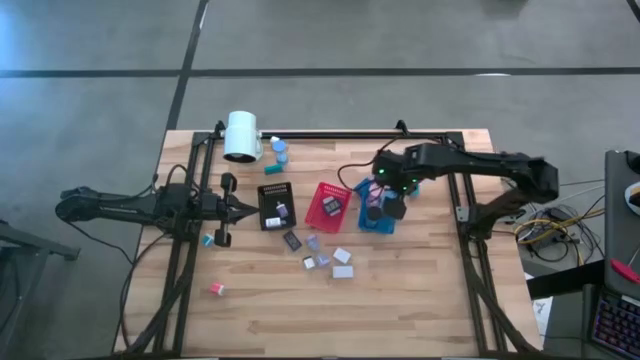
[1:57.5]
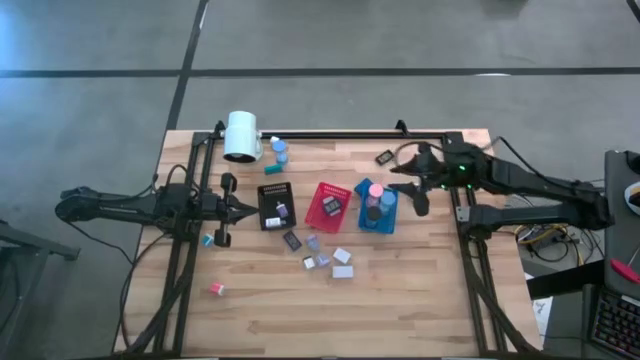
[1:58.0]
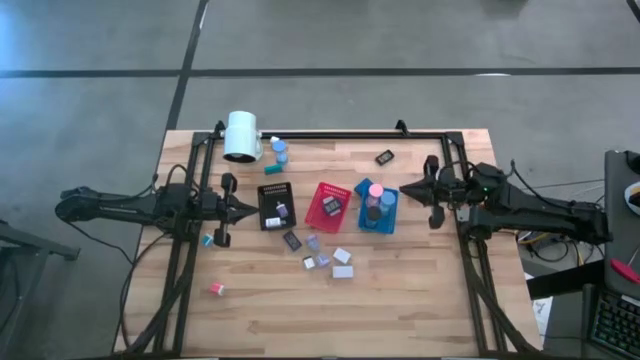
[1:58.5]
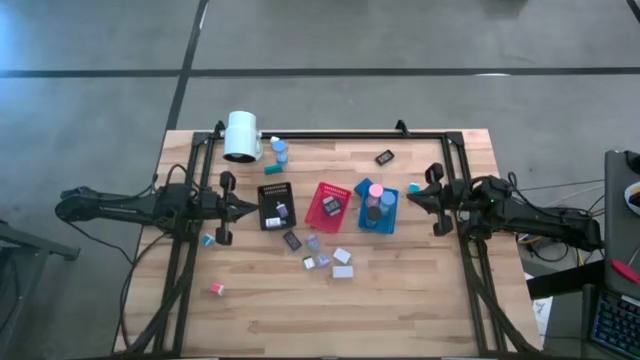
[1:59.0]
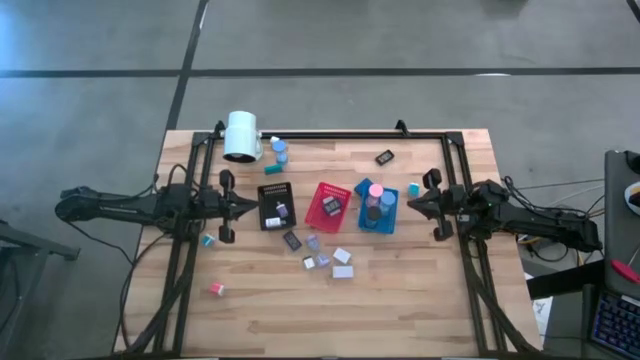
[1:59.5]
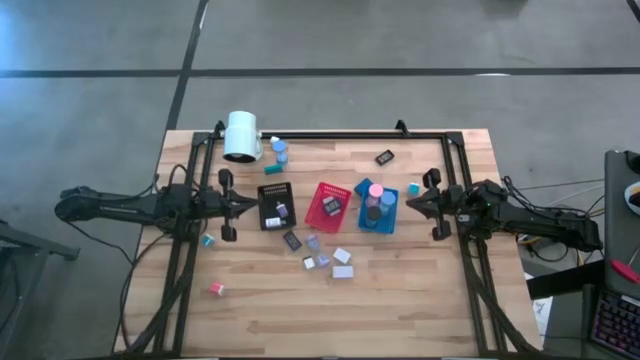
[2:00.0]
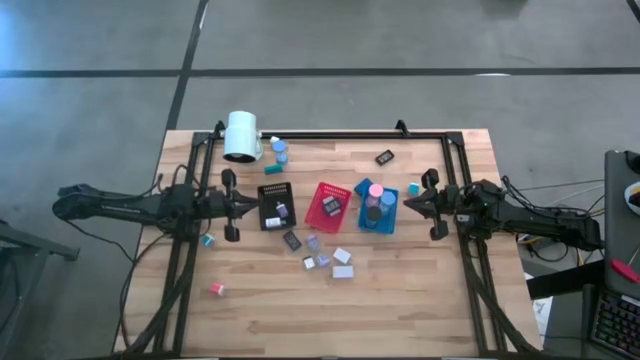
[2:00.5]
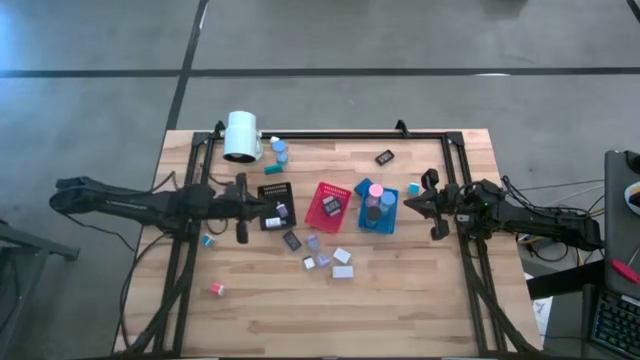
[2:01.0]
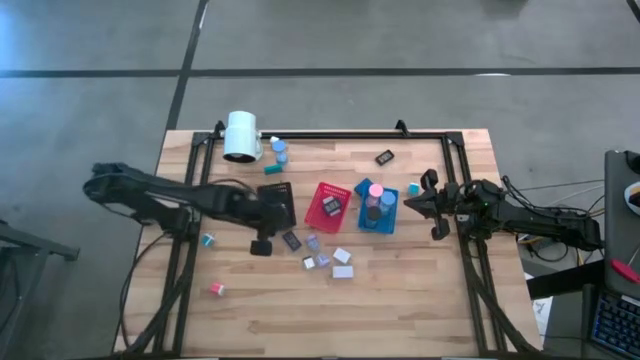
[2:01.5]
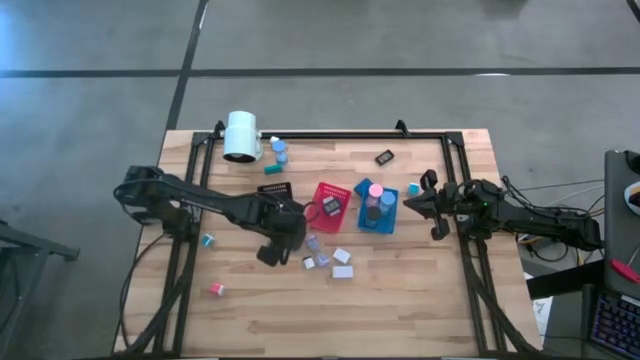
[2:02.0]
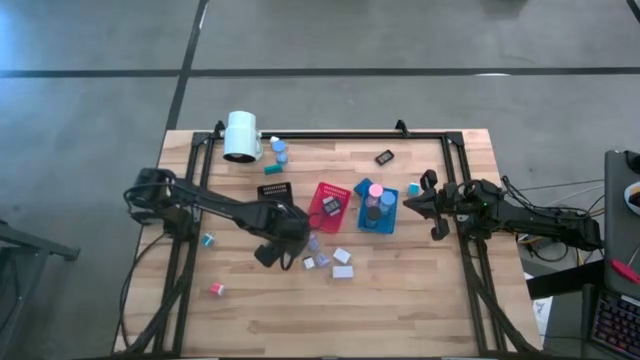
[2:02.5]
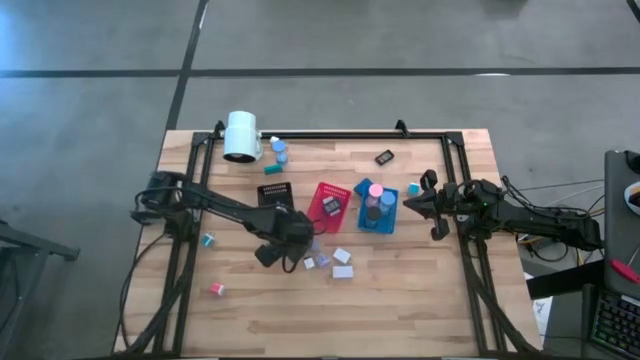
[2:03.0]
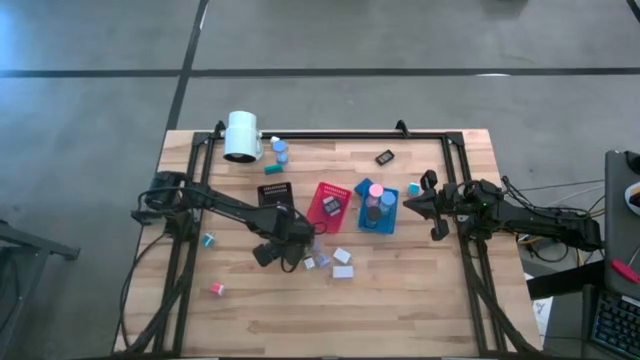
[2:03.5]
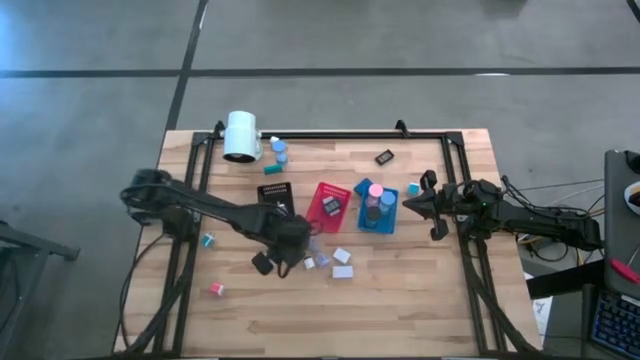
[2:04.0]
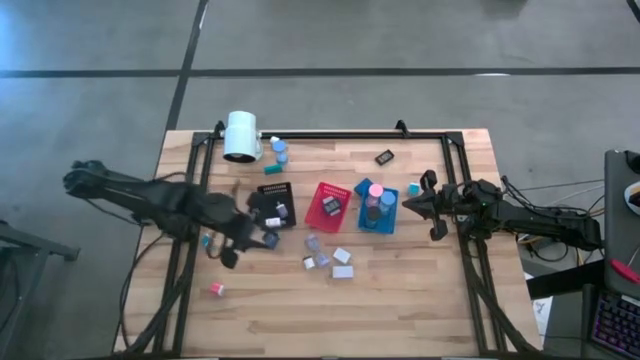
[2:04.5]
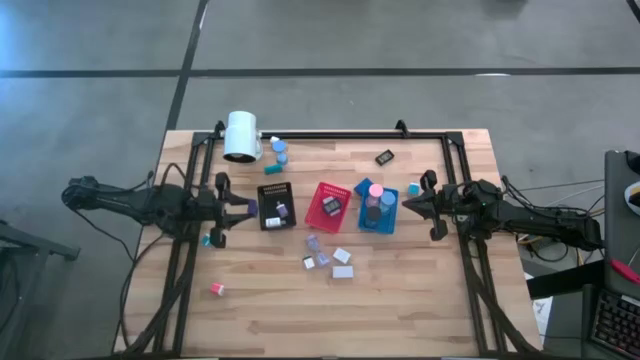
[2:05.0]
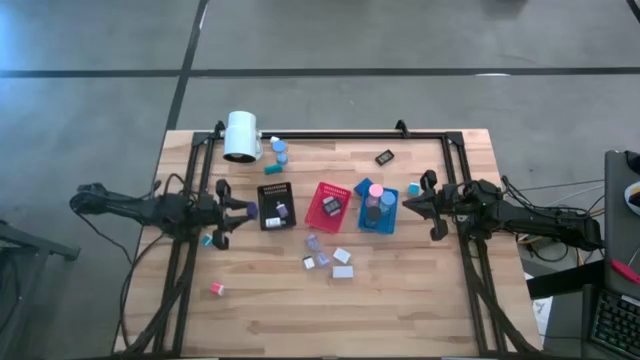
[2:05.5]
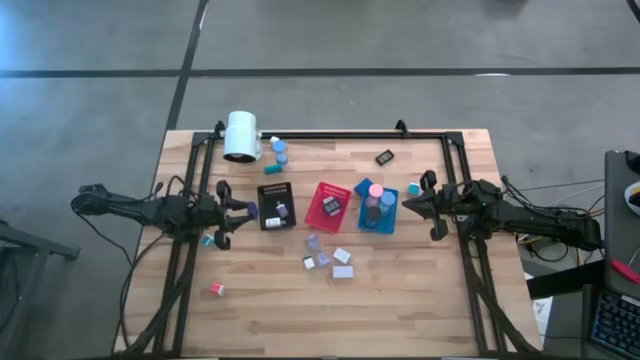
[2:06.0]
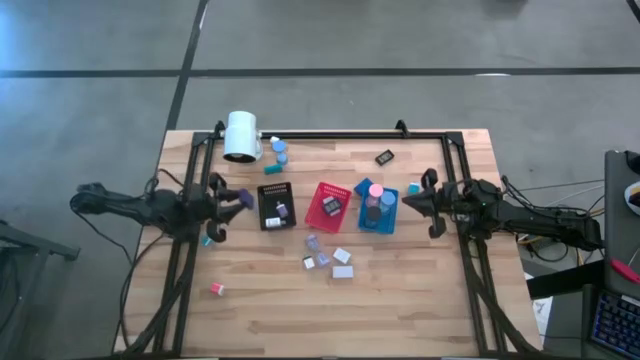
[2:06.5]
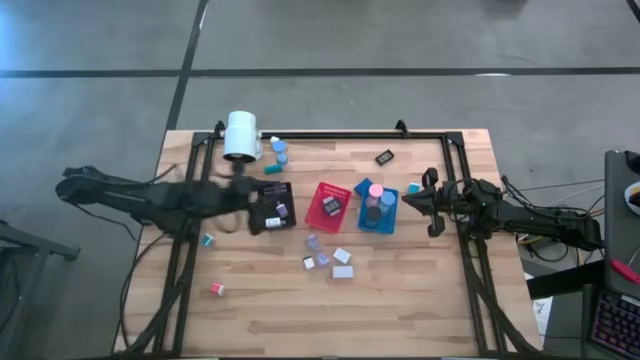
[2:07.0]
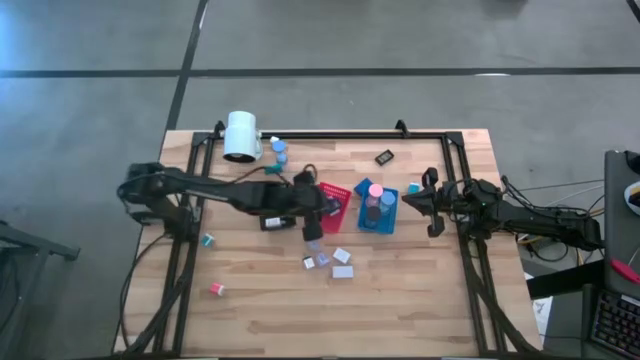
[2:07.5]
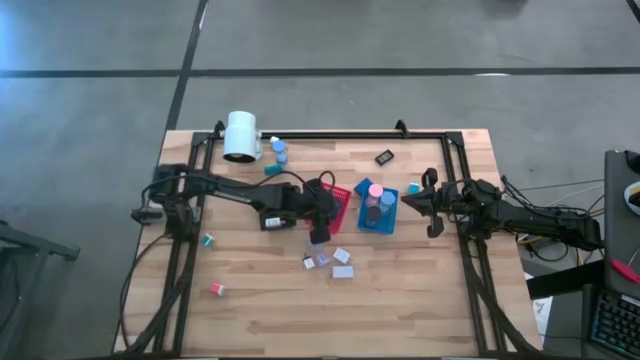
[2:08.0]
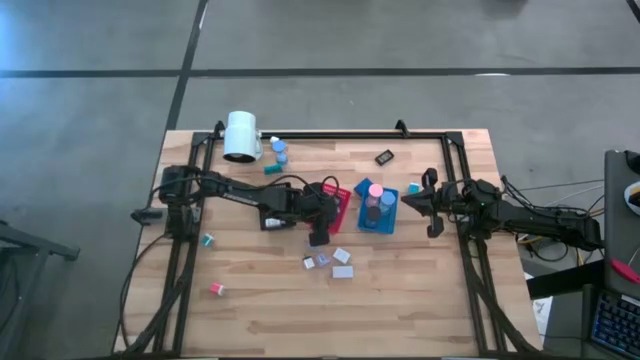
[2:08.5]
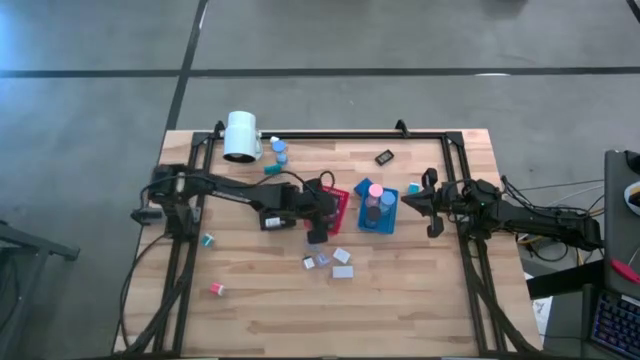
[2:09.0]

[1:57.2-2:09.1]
Task: Pick & Place Office items
Put the bottom blue digital clock into the red bin

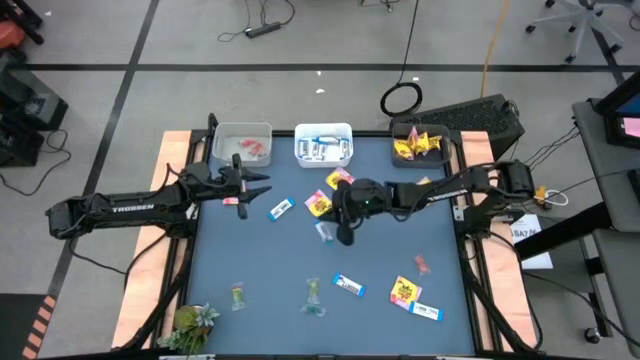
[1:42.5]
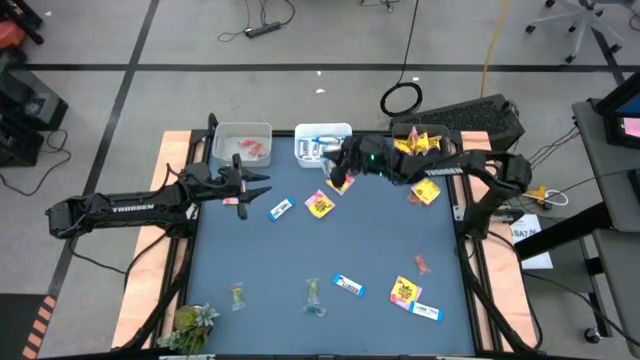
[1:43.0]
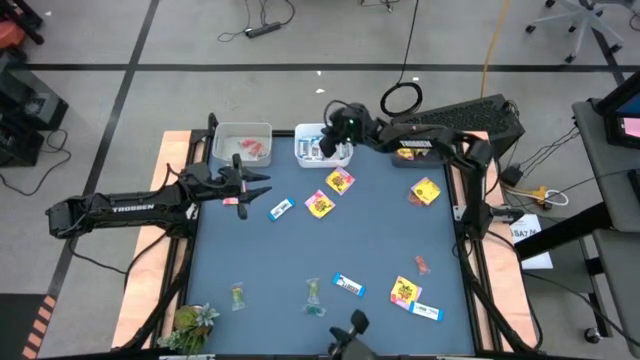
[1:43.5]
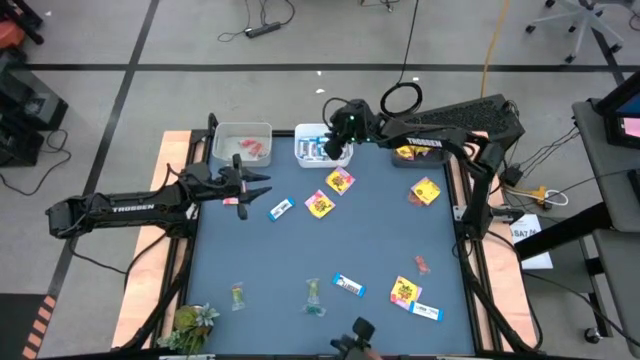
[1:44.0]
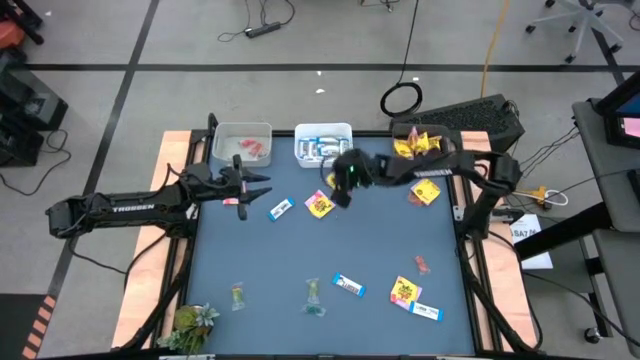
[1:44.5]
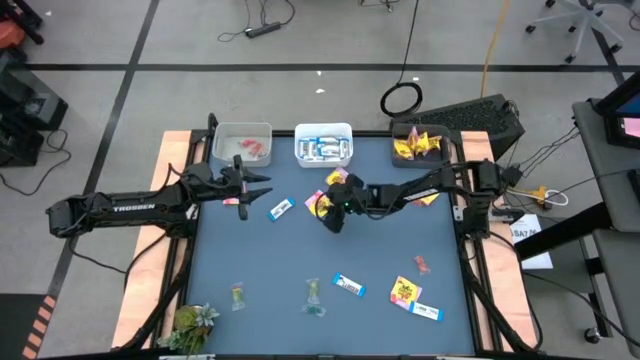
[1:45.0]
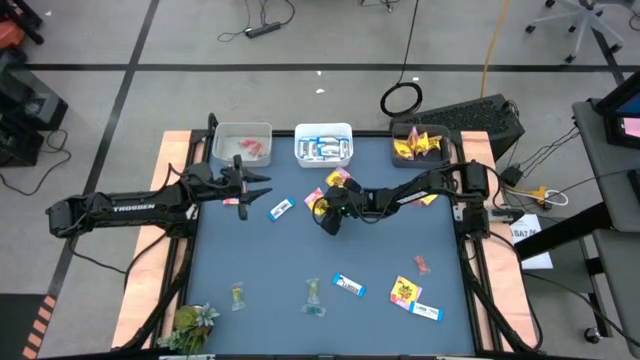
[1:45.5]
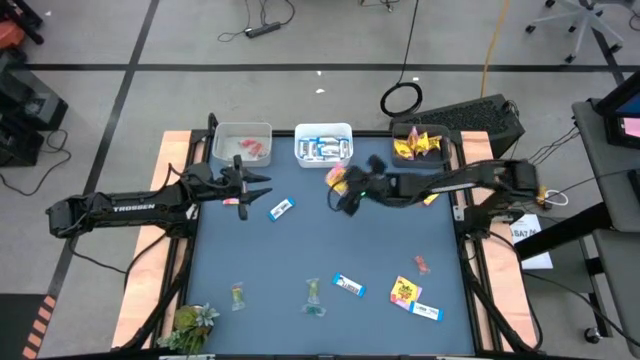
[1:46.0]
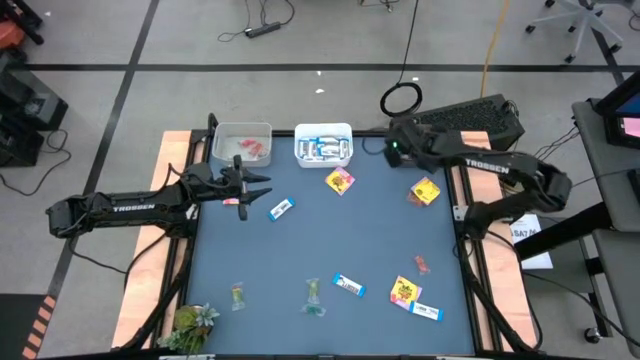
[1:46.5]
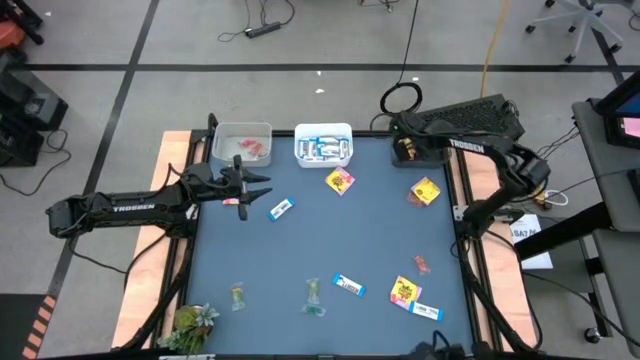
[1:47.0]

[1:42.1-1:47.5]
Task: Sort candy
Put the yellow candy into the black bin

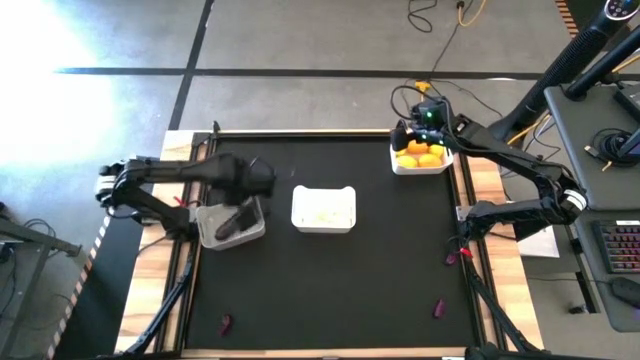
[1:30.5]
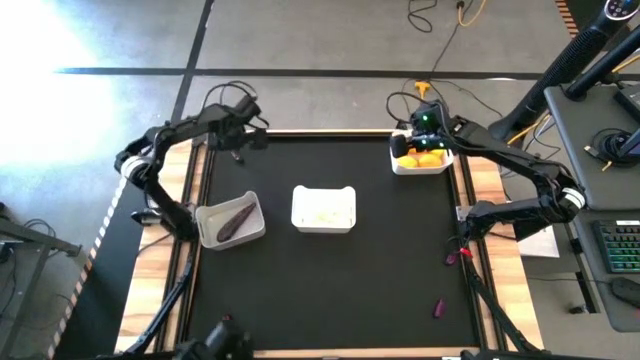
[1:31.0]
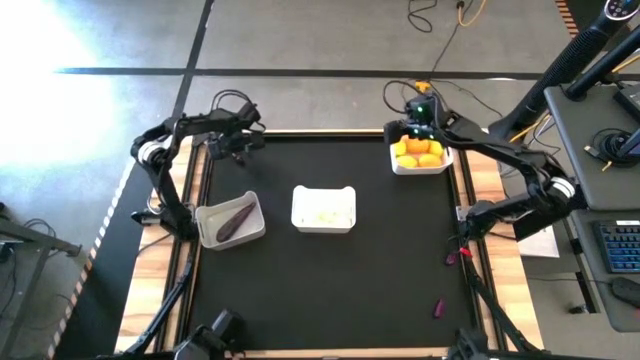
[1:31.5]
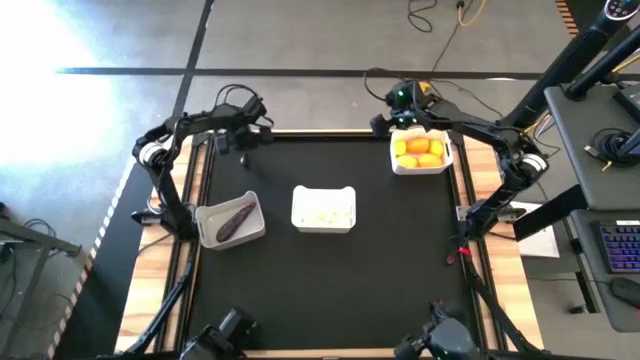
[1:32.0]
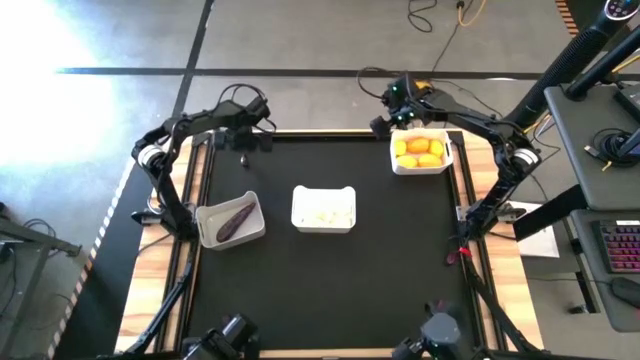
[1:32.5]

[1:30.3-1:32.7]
Task: Sort produce into baskets
Put the purple eggplant into the gray bin

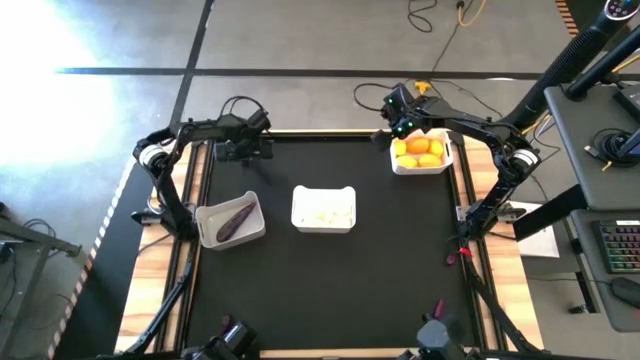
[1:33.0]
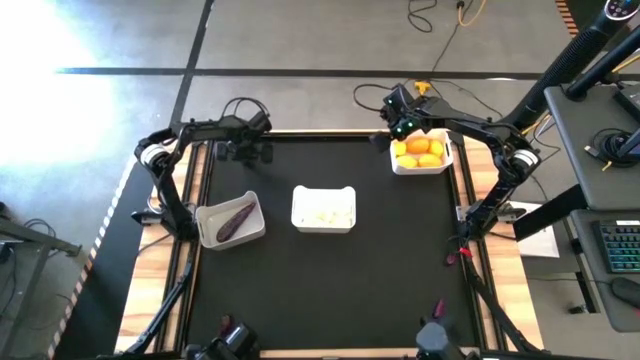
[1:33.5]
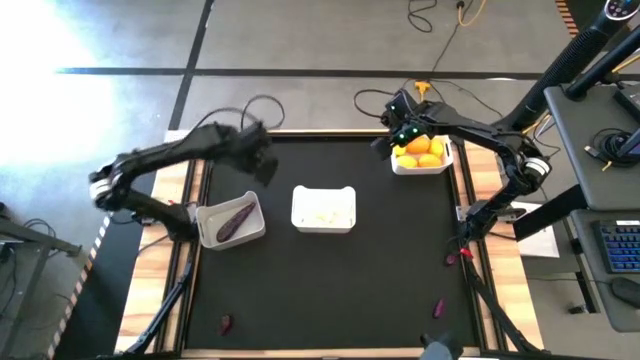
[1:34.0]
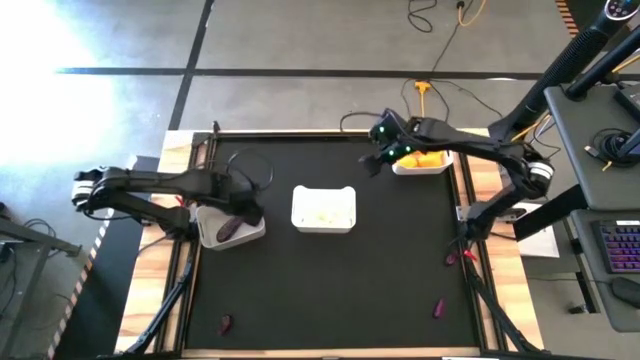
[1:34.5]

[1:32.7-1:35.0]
Put the purple eggplant into the gray bin
